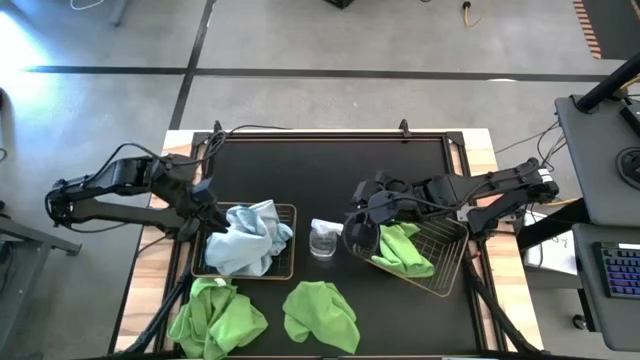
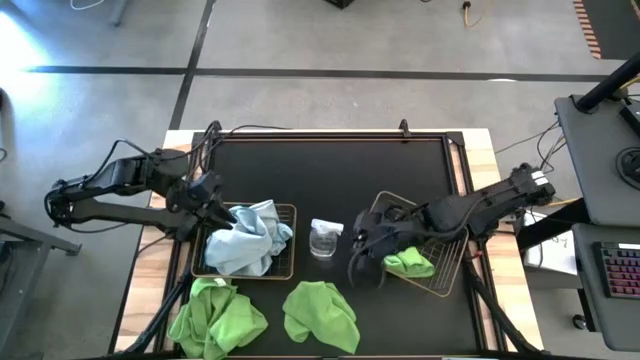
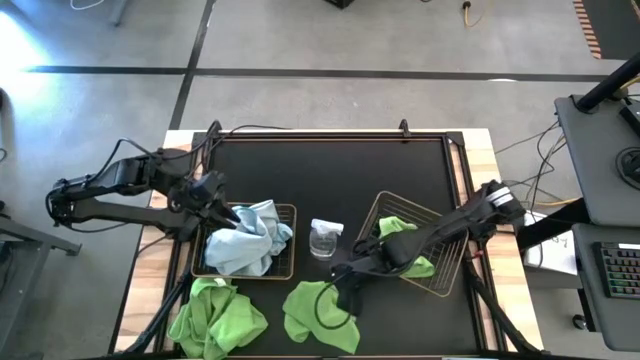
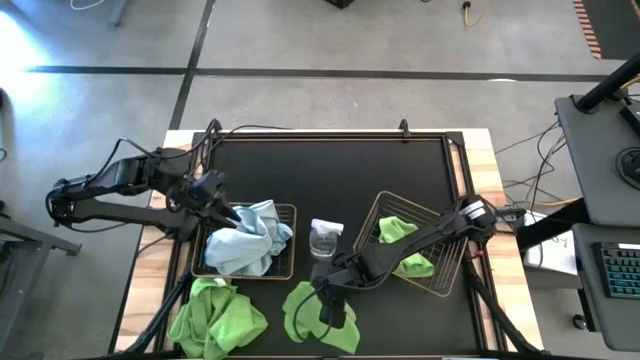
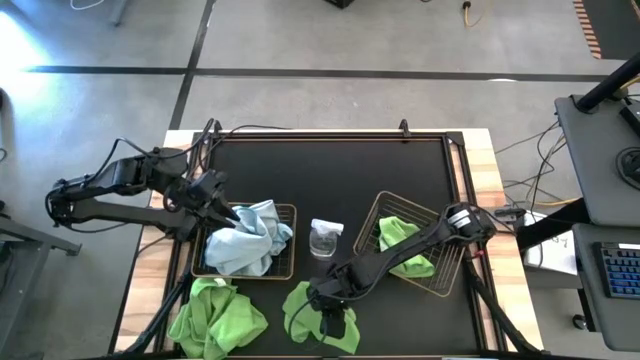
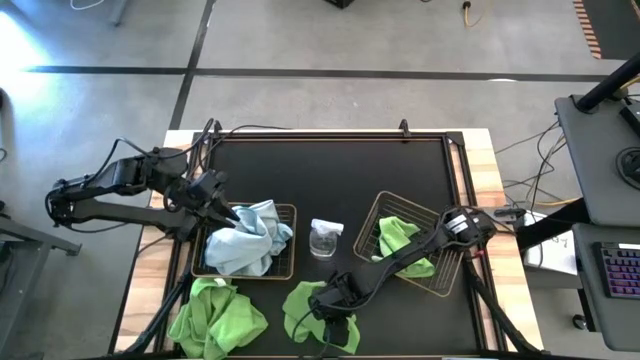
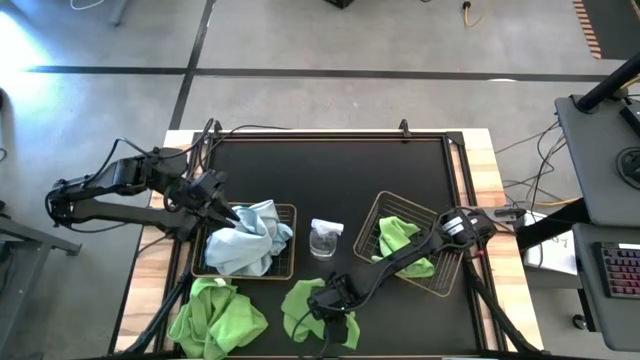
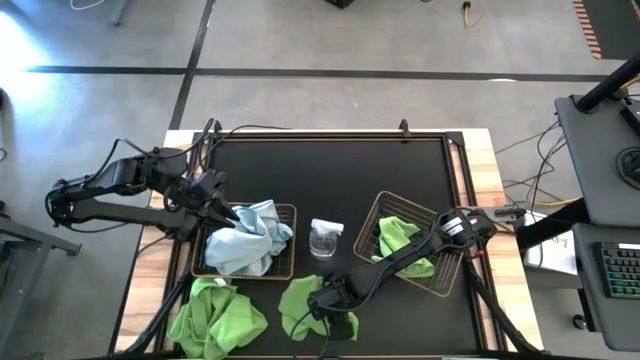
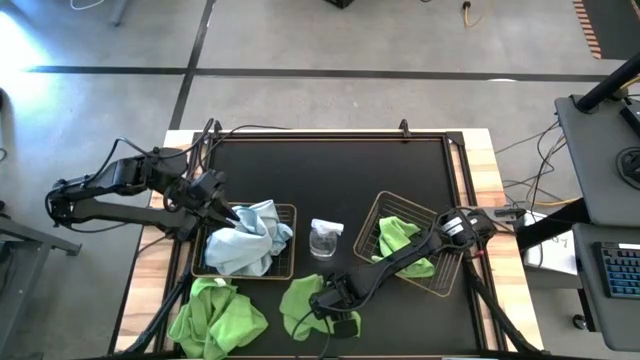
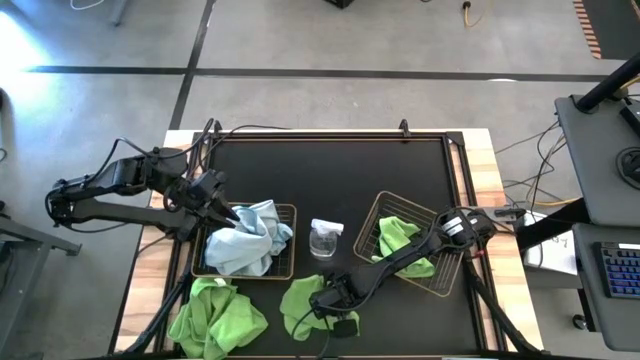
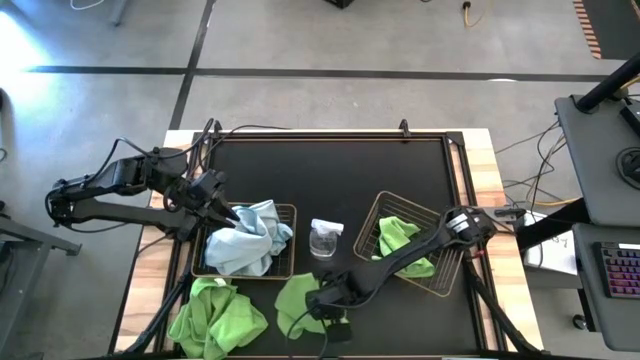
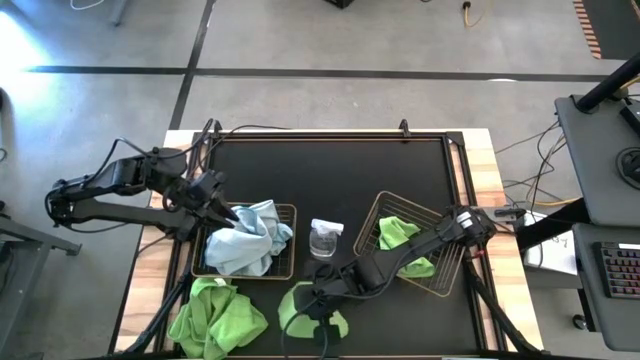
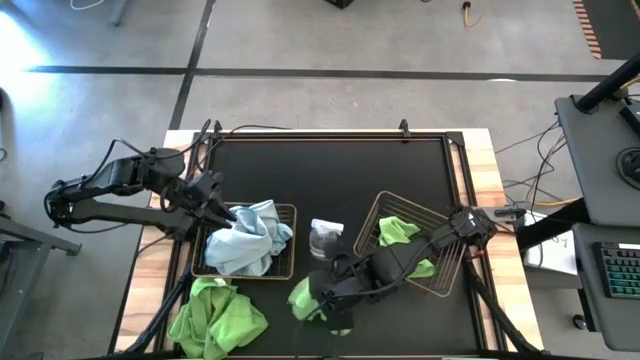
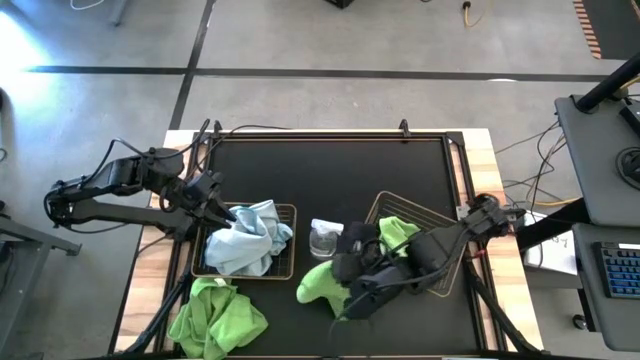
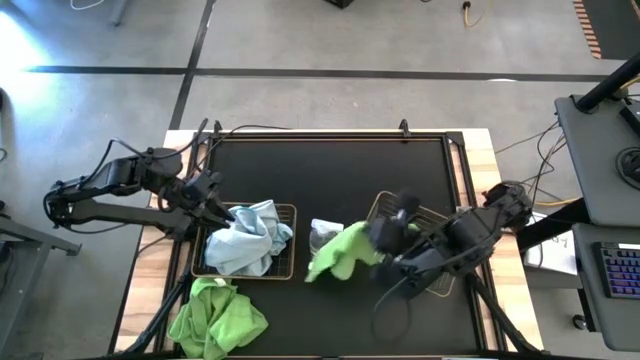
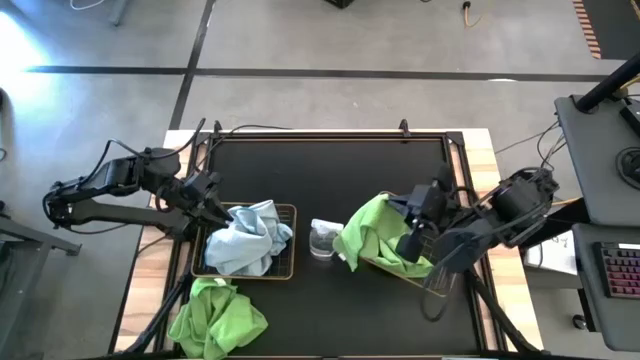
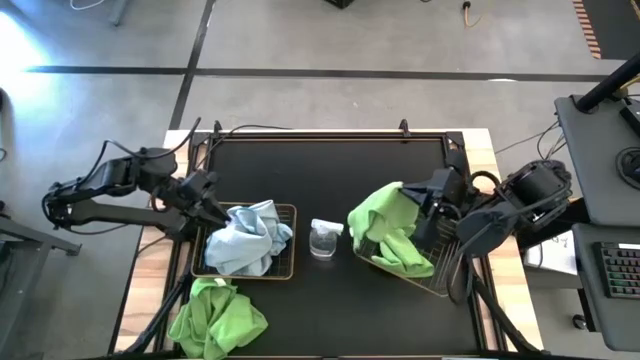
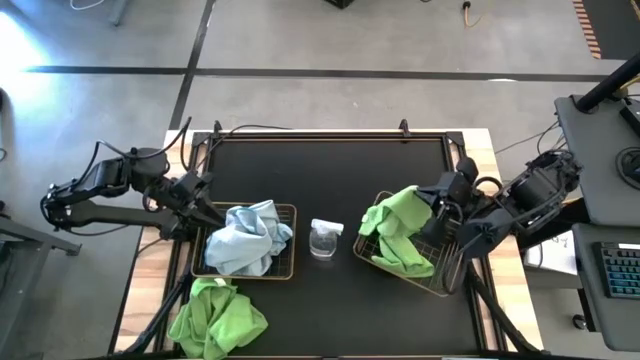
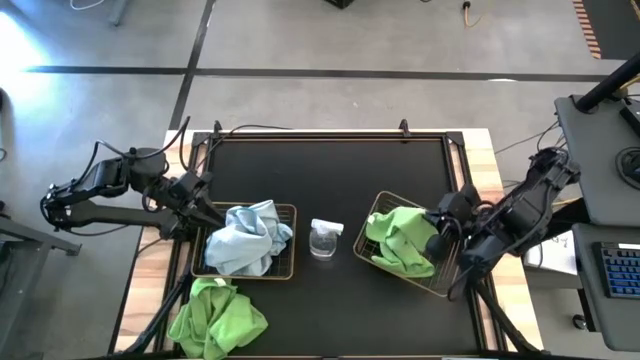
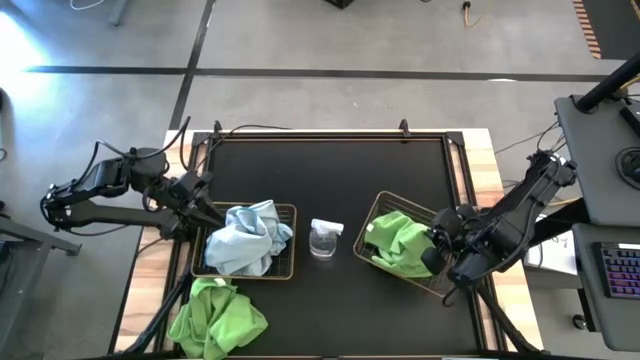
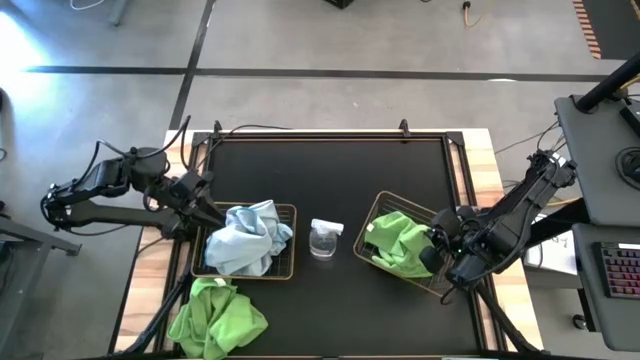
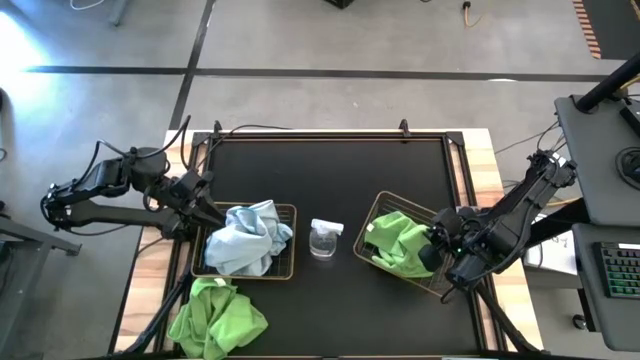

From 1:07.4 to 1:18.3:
Task: Sort microfiber towel by color & place in baskets
Put the green microfiber towel into the right wire basket

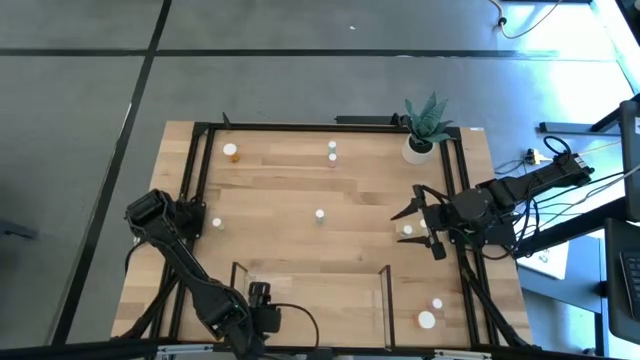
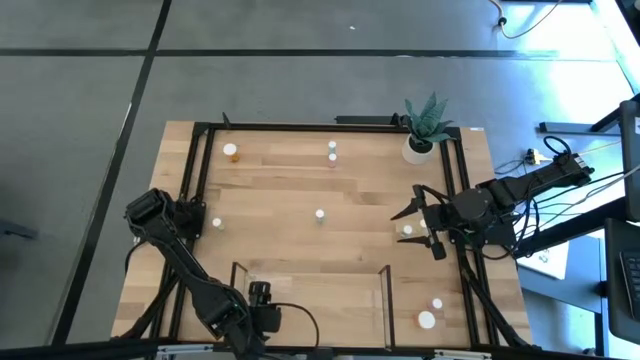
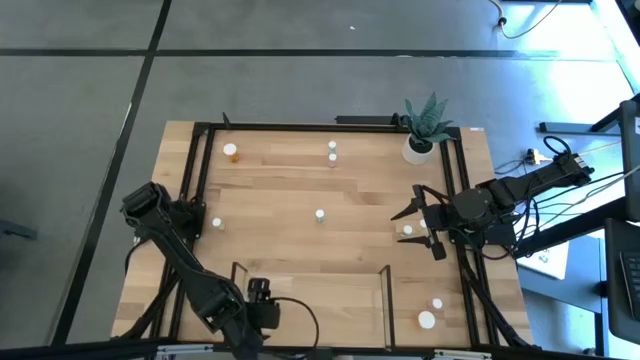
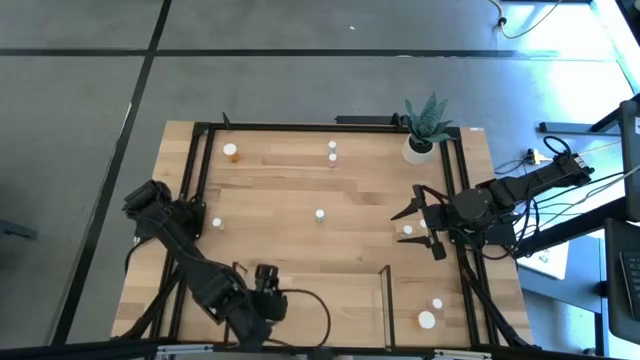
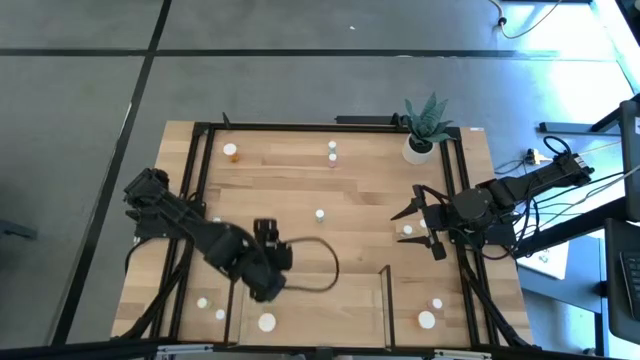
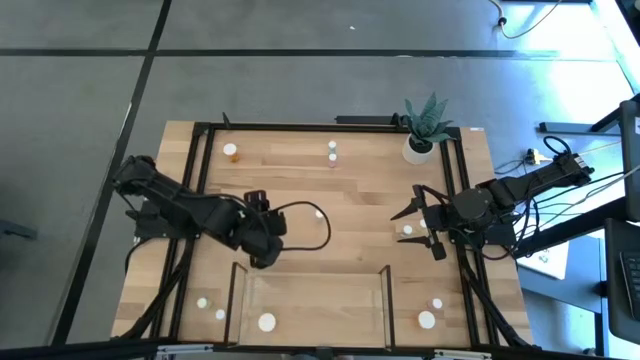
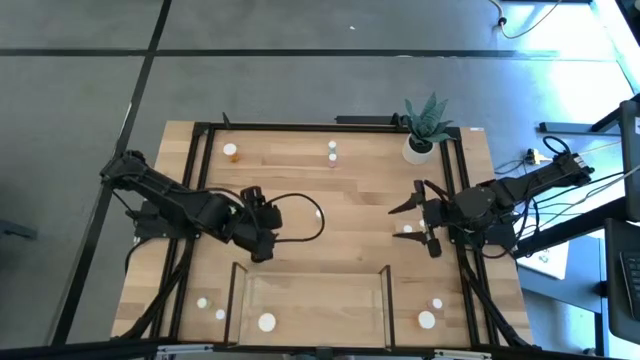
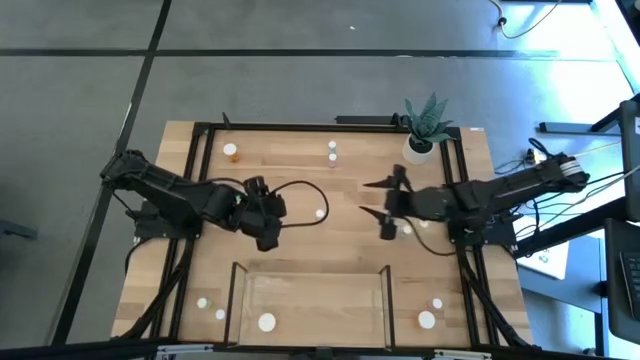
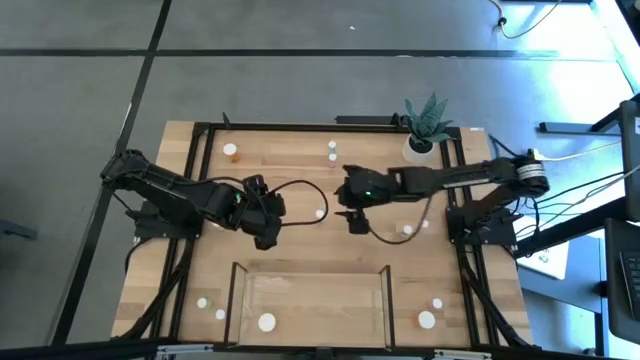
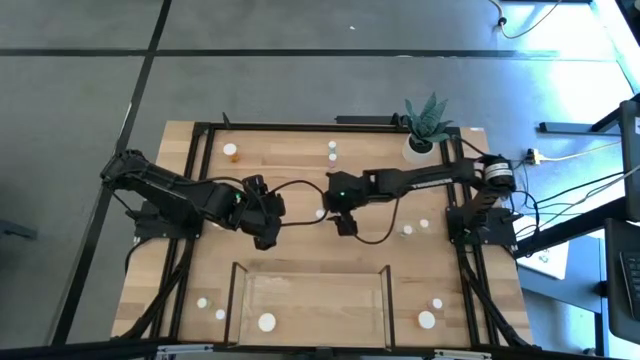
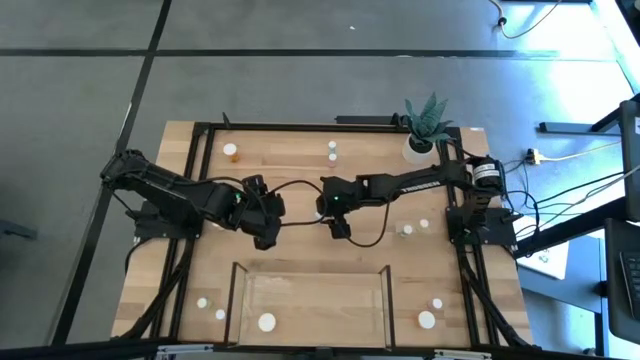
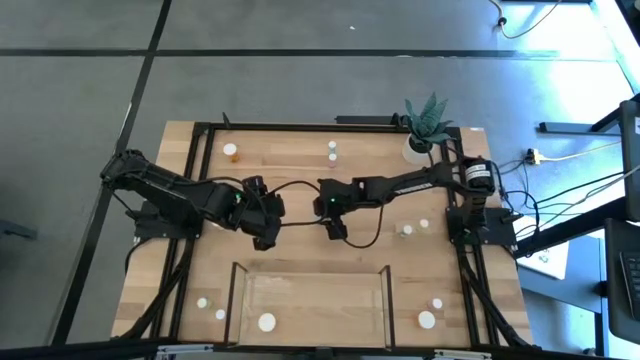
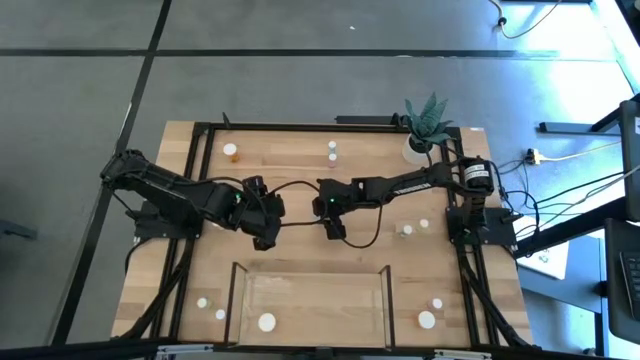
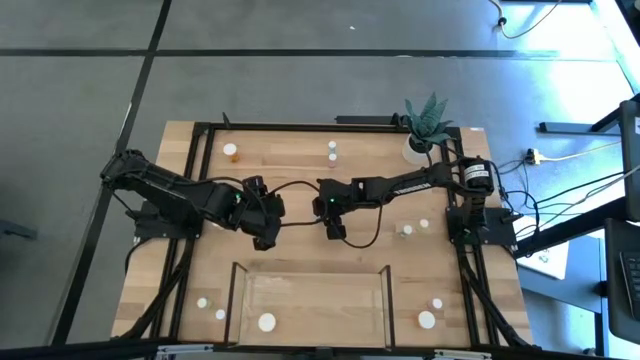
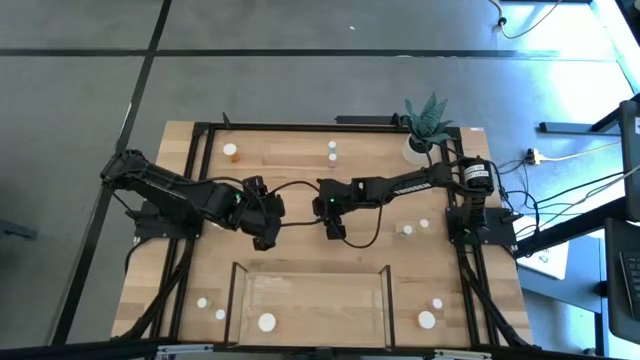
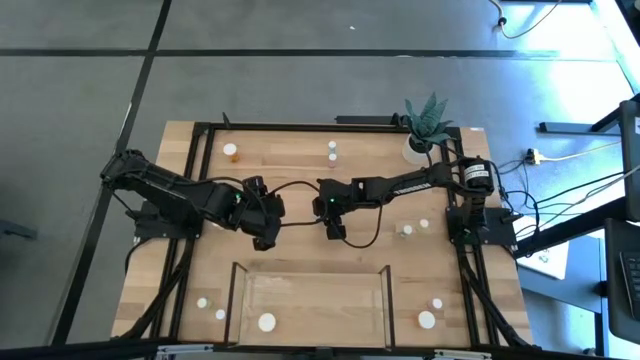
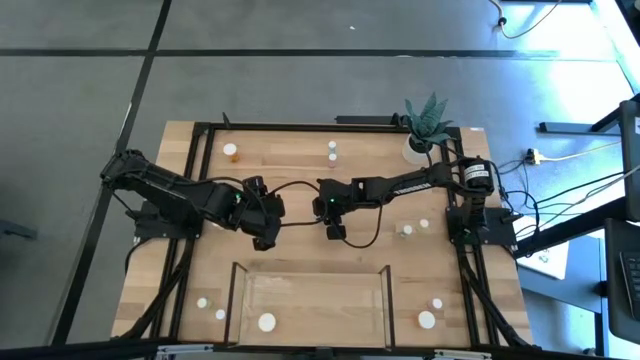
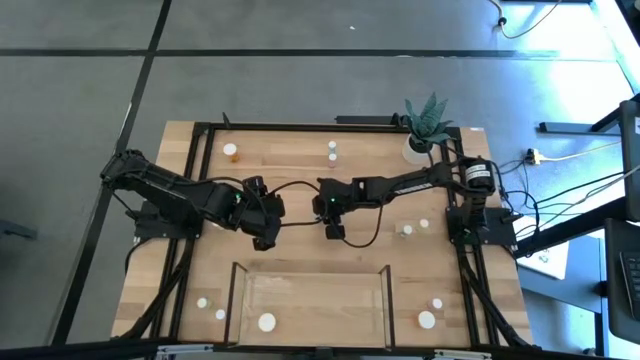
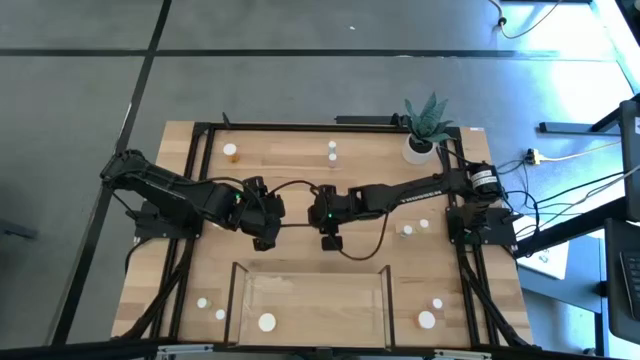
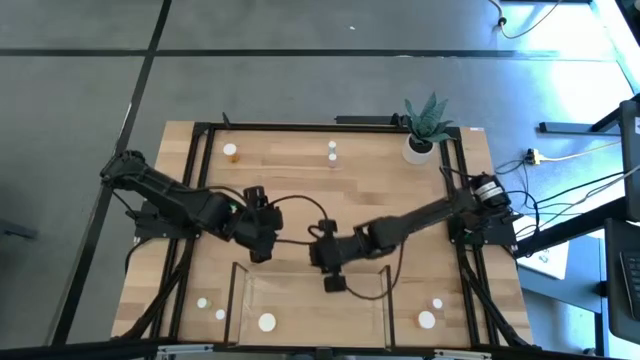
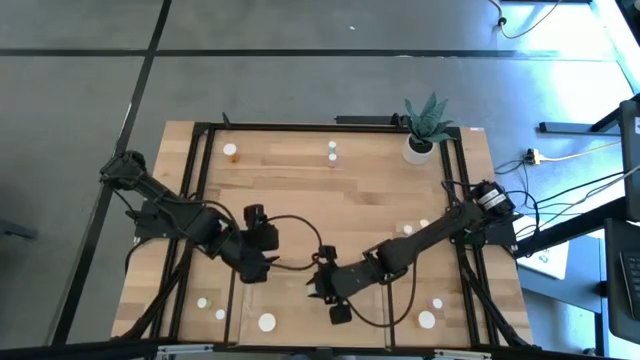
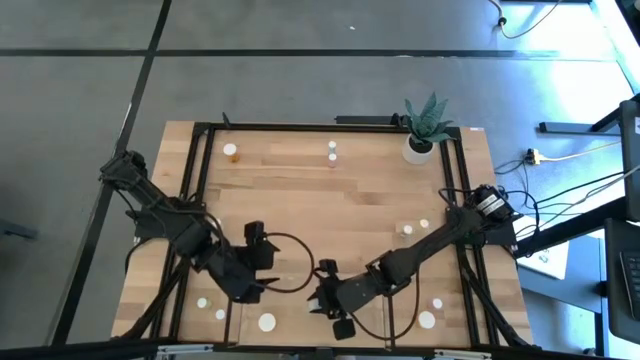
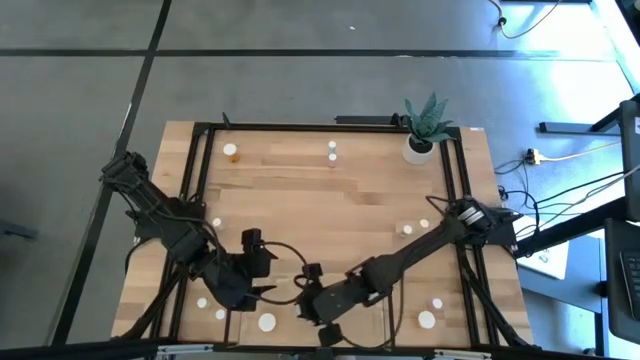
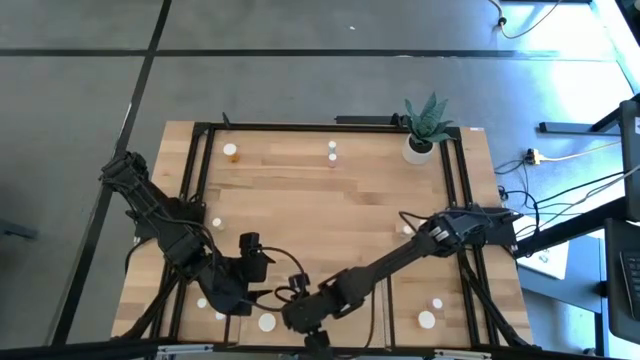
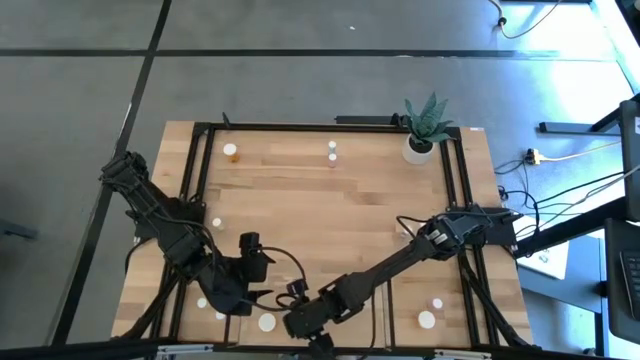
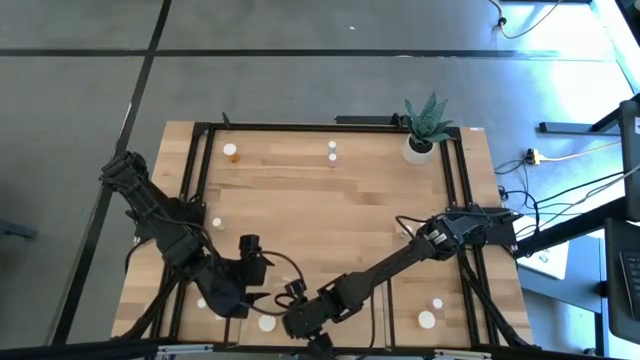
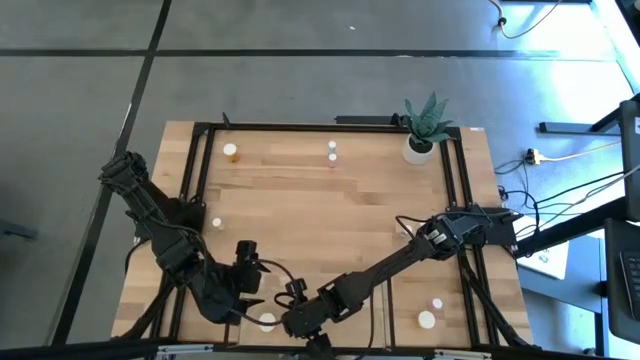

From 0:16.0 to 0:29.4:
Task: Pick and place medicine bottles onto shelf by color
Put the bottom left blue pill bottle on the shelf
